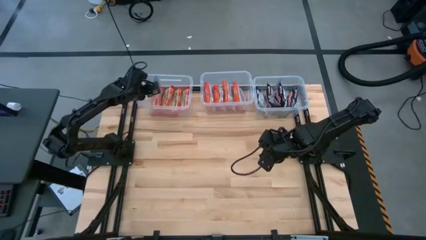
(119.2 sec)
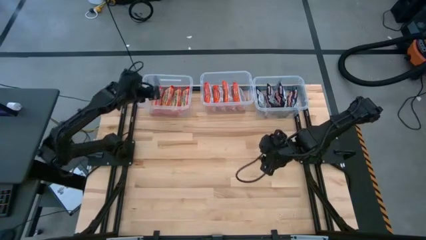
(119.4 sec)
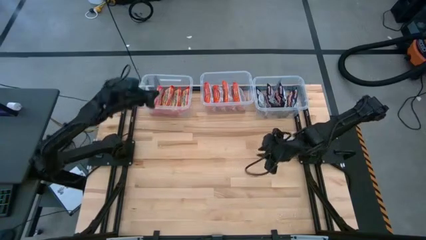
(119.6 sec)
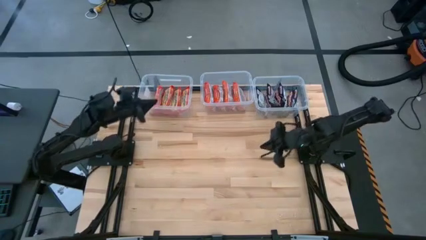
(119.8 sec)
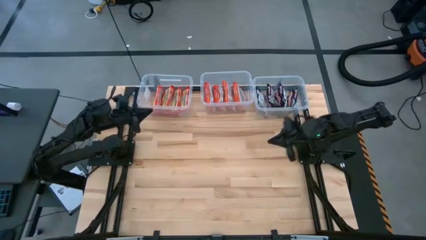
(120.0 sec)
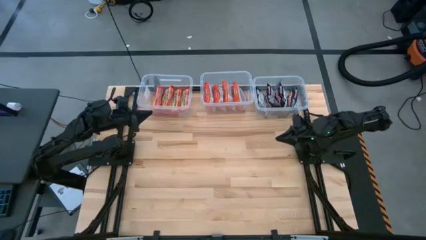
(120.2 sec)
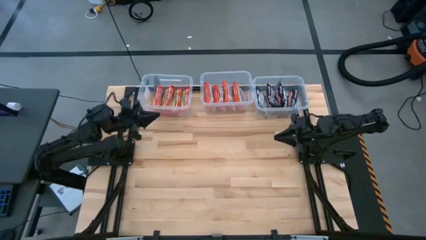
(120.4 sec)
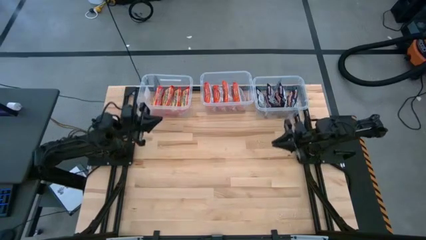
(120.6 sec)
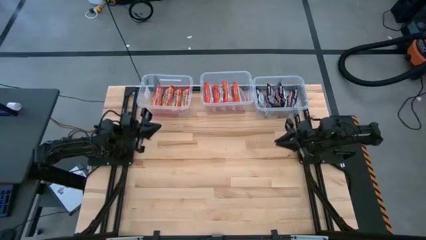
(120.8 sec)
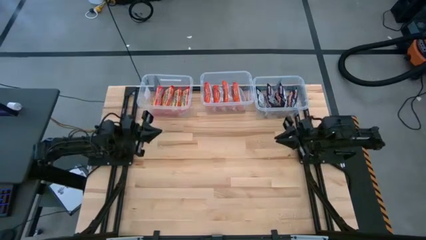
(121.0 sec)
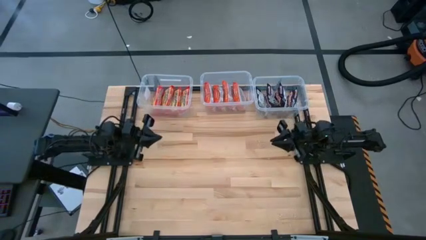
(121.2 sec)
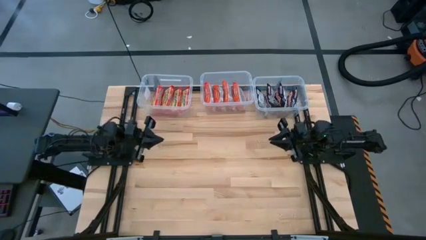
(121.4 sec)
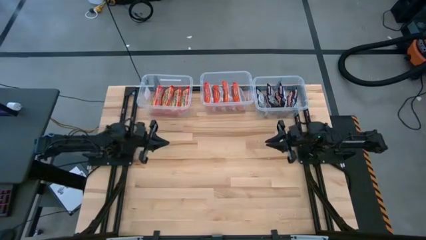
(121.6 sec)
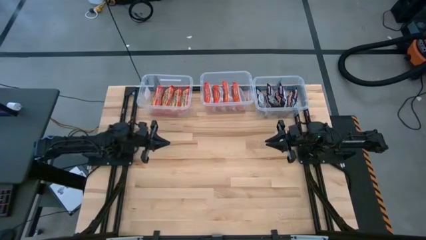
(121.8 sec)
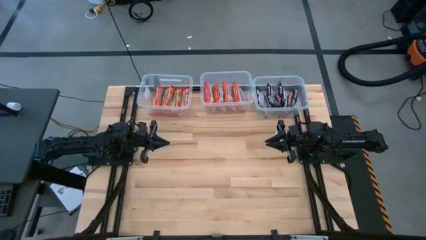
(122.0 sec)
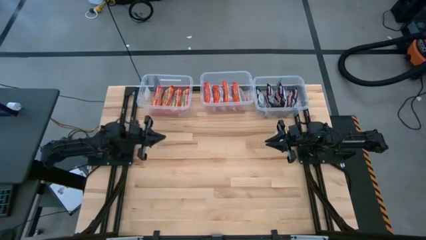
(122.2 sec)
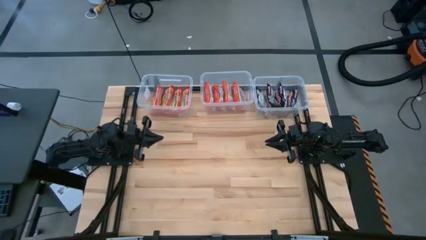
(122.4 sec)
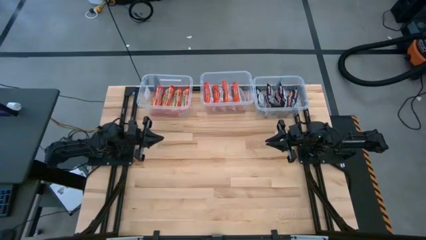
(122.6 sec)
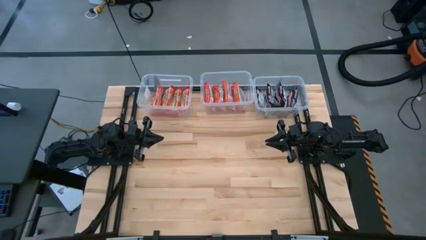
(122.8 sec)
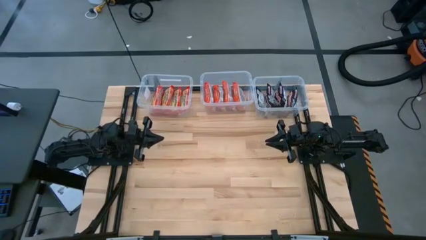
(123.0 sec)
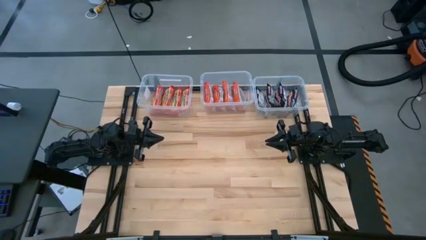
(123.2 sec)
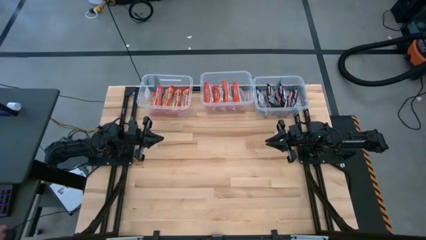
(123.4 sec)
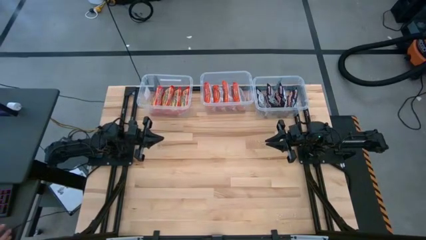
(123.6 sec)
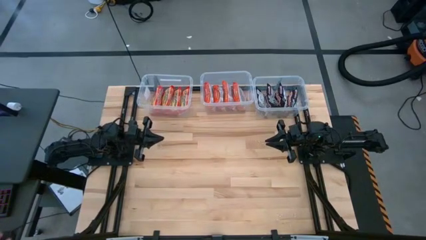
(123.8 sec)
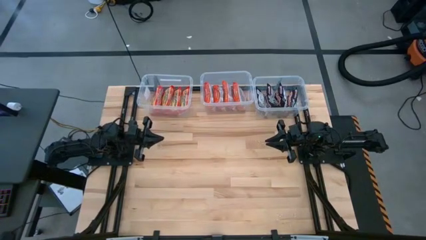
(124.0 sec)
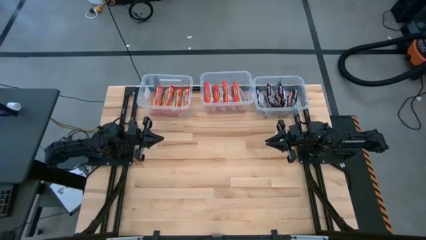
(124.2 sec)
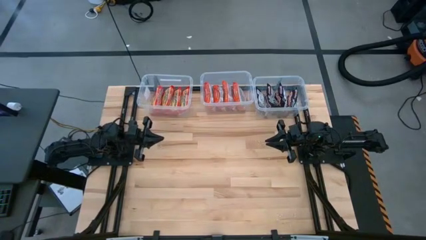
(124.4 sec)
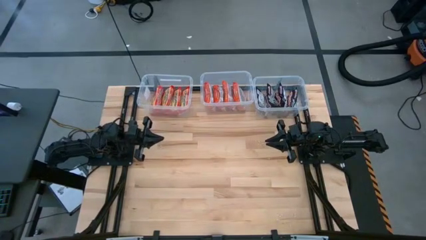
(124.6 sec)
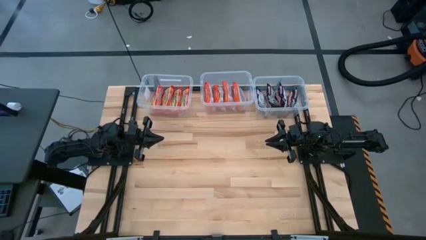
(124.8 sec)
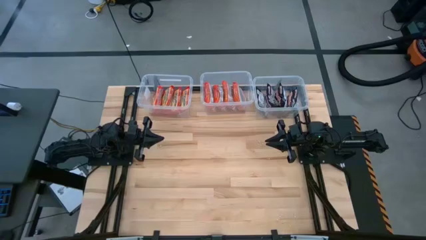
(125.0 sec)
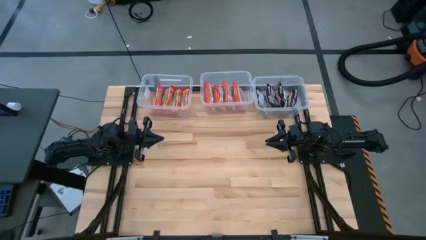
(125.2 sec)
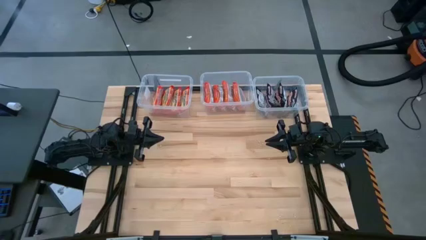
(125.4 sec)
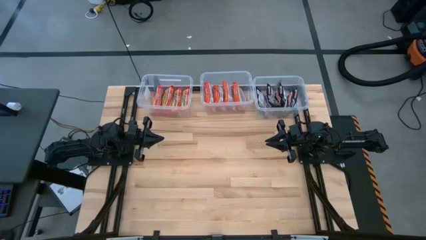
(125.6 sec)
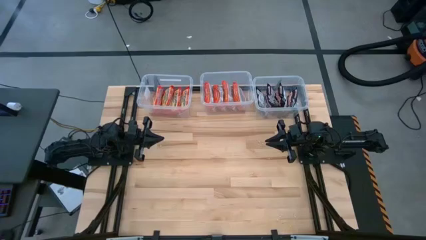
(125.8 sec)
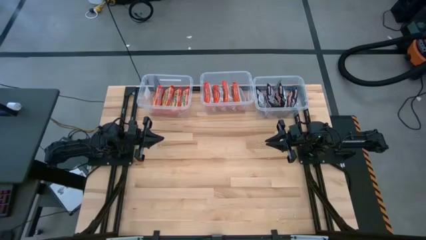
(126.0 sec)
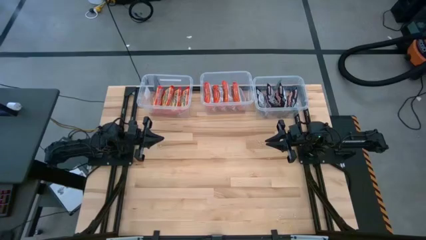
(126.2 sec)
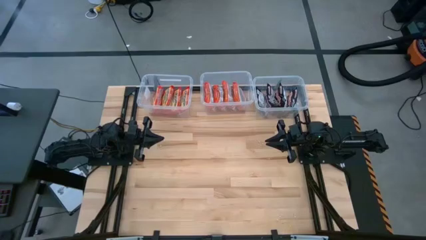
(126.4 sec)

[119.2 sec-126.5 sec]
Task: Sort Maruchan noodles
Return to Home Position

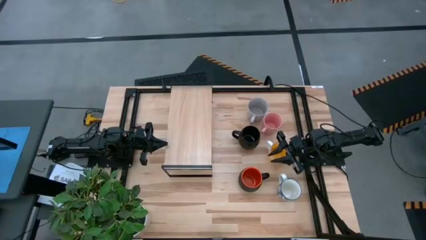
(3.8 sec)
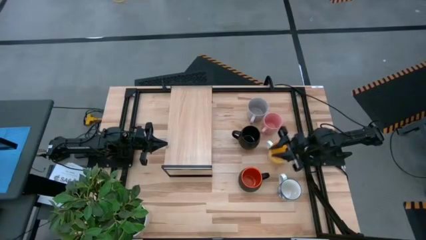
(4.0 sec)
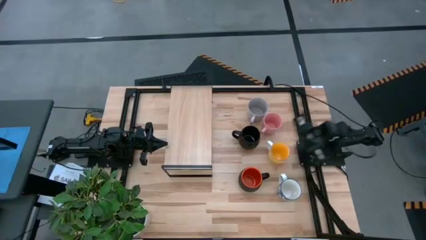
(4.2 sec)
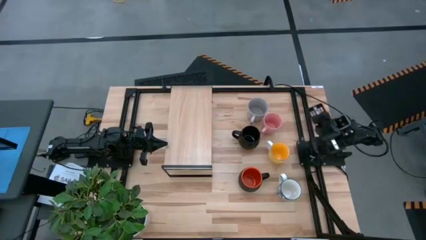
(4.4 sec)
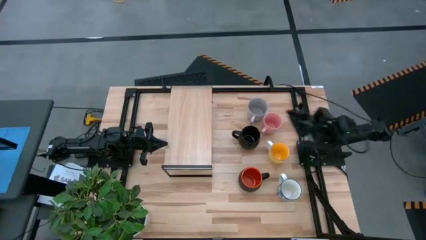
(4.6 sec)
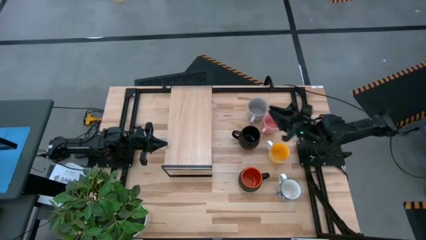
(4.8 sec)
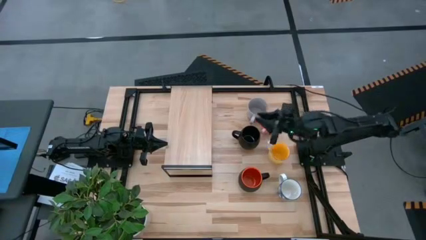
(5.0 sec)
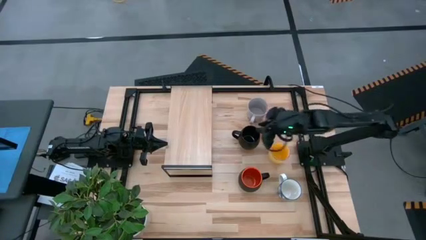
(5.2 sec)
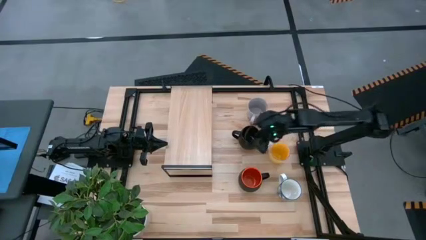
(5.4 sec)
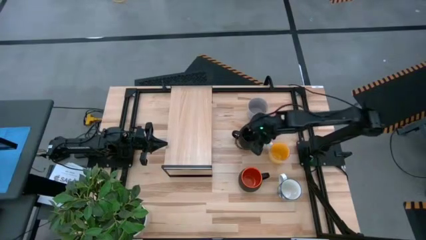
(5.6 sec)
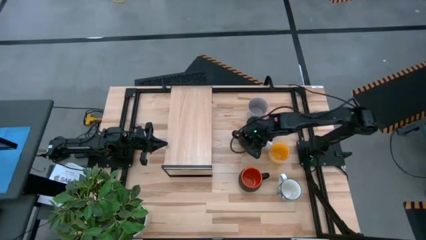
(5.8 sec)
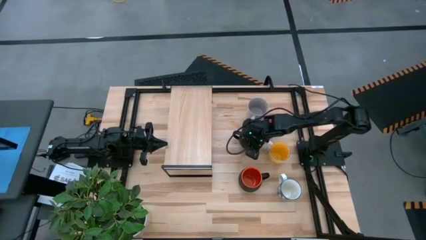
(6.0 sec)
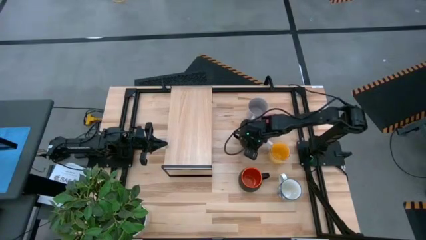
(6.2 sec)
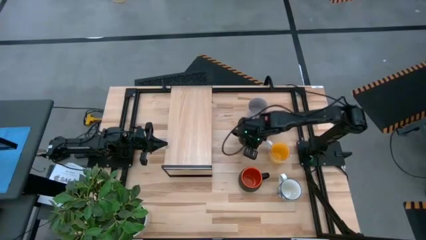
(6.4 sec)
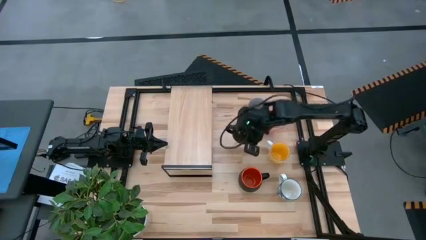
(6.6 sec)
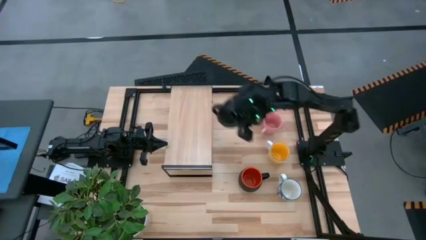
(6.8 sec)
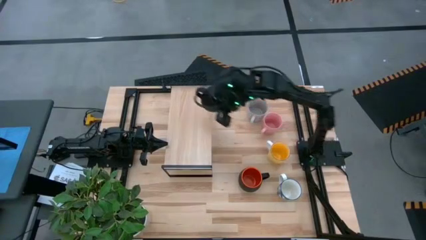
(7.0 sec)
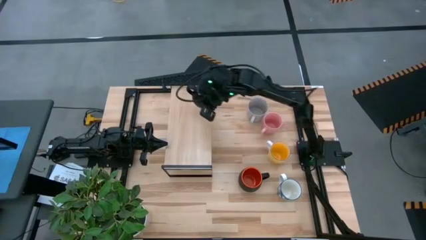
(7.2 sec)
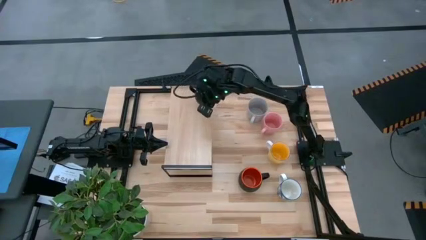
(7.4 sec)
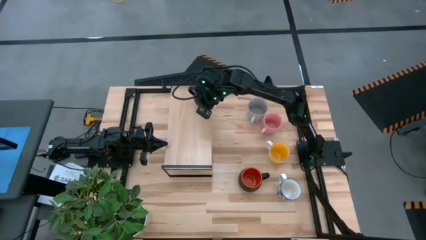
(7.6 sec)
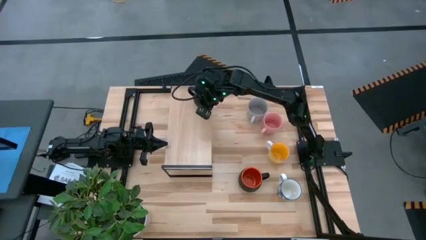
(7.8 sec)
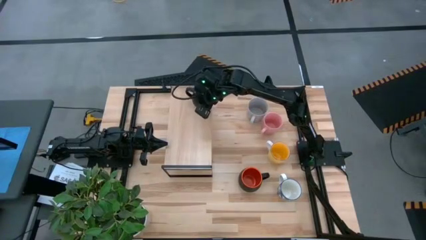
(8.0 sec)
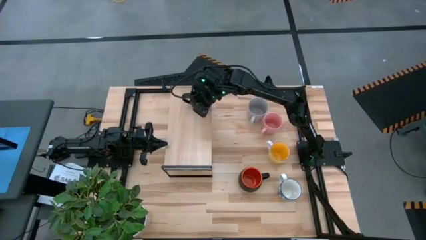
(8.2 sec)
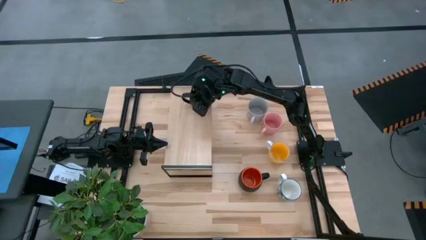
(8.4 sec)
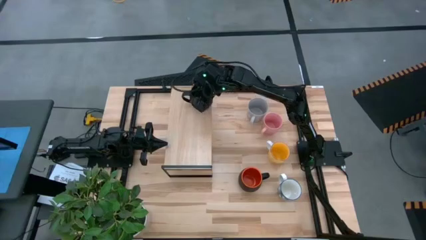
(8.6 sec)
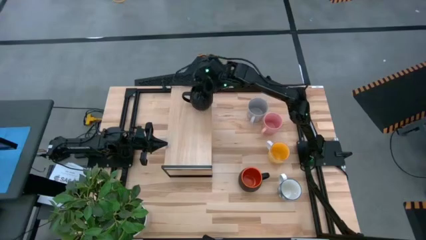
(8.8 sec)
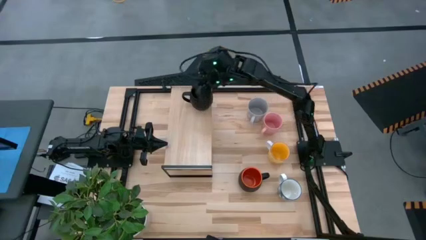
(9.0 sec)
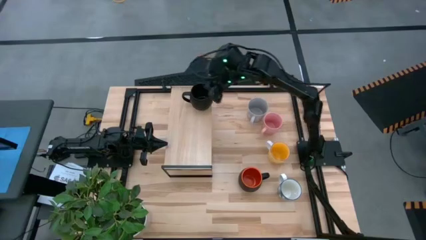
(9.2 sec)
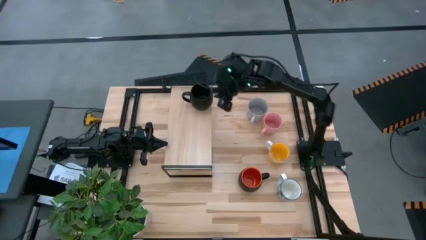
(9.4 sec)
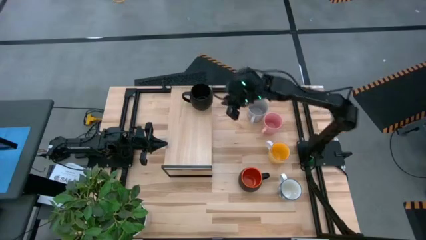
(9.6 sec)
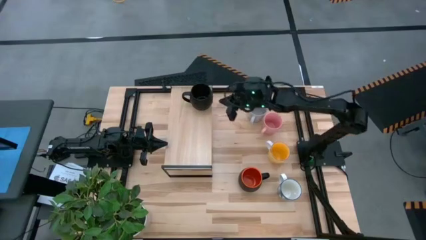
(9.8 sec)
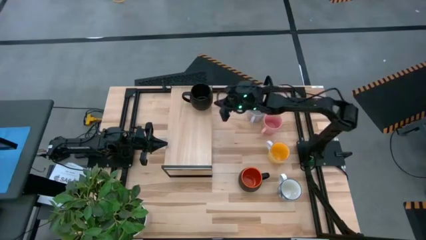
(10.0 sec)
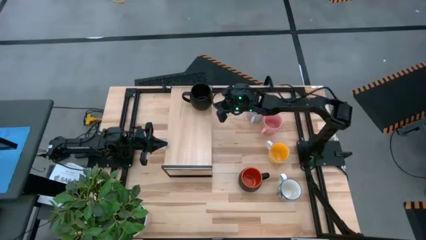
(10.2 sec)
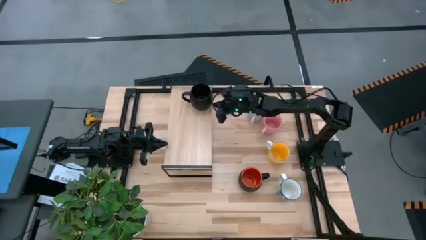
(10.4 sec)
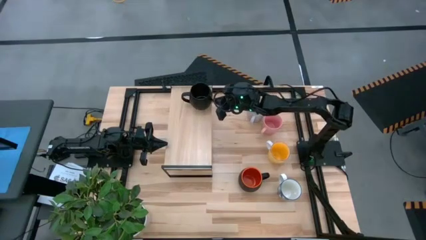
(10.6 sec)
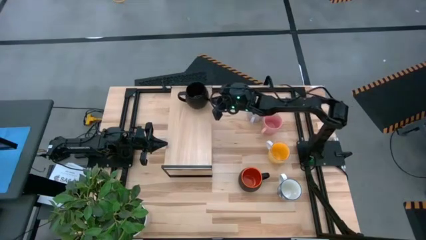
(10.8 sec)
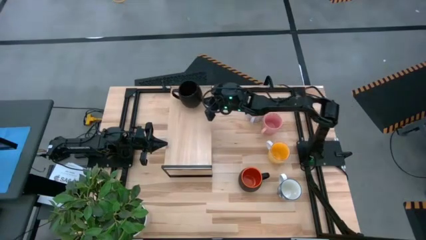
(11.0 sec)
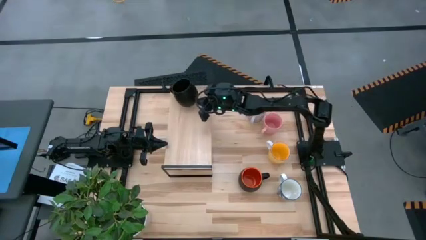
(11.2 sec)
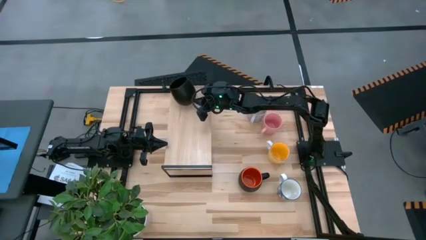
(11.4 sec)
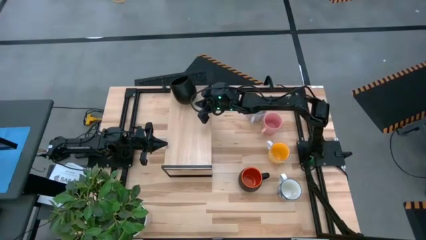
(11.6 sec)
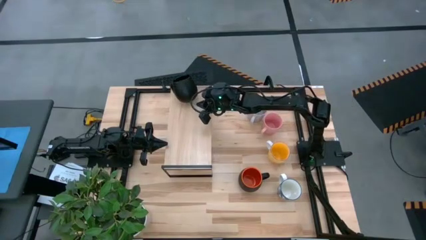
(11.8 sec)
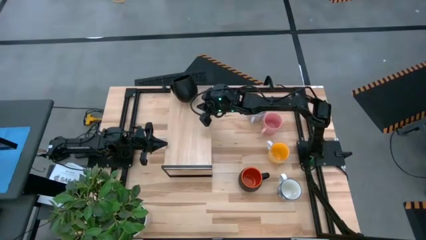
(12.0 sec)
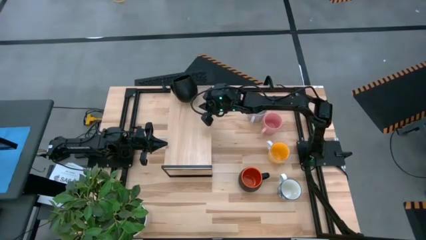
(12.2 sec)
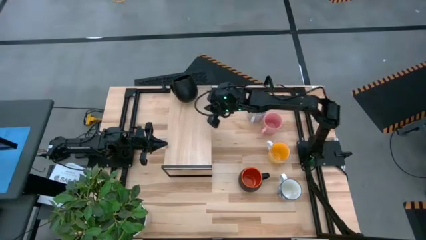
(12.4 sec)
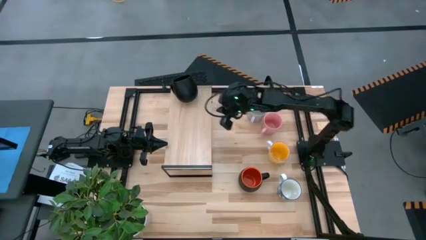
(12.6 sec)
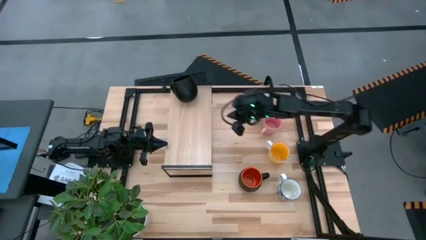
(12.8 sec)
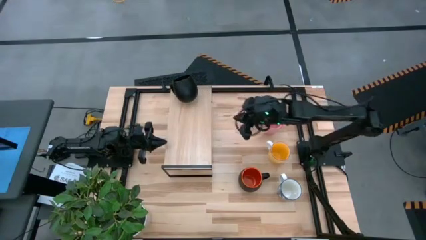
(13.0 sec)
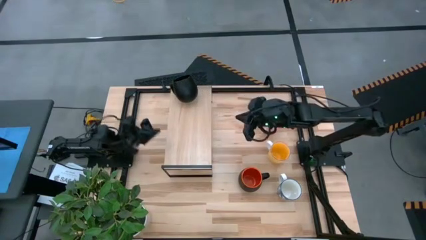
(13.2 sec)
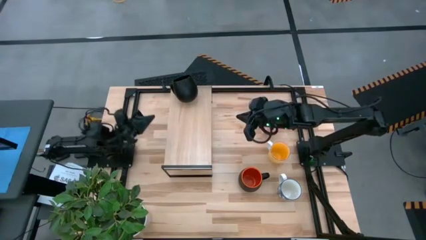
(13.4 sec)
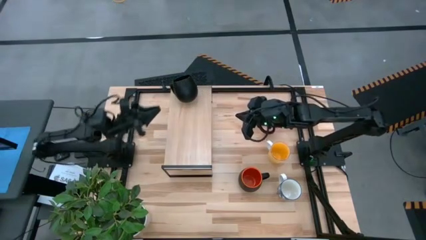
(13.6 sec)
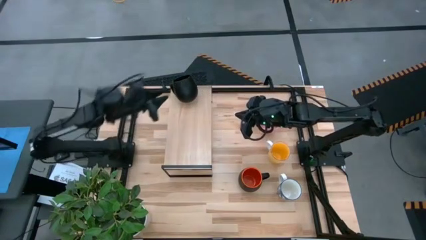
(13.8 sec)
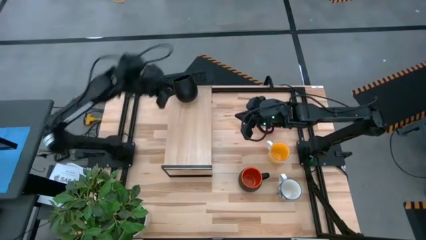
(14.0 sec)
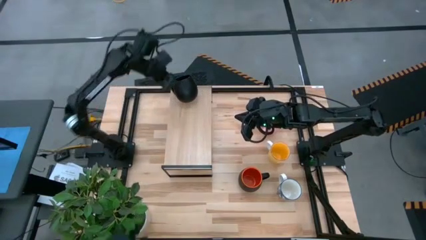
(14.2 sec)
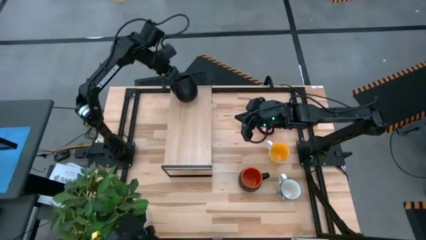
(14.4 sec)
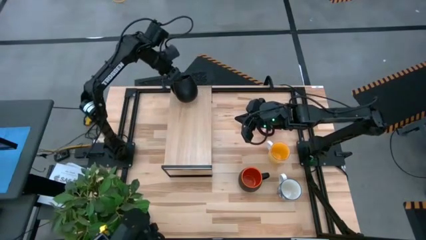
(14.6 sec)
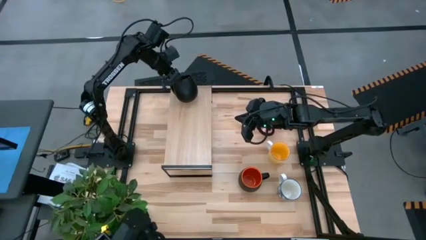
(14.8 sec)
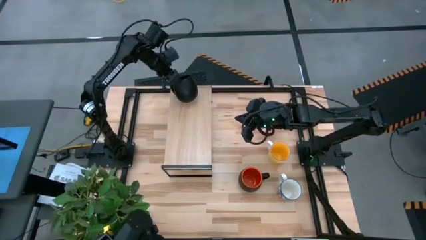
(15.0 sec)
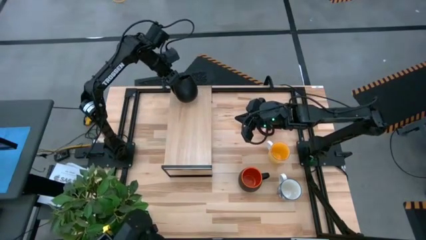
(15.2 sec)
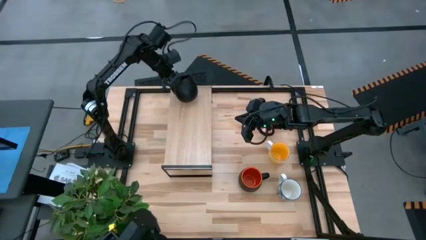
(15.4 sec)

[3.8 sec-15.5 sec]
Task: Place coffee mugs
Put the black mug on the shelf
